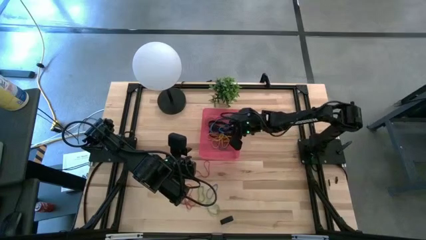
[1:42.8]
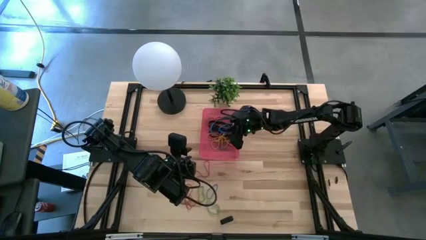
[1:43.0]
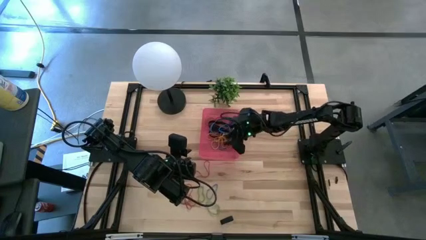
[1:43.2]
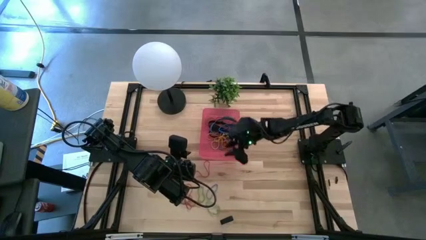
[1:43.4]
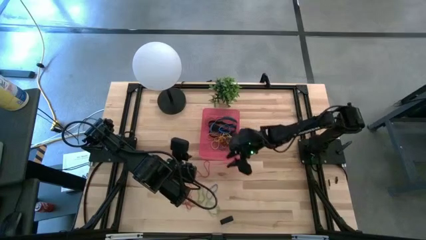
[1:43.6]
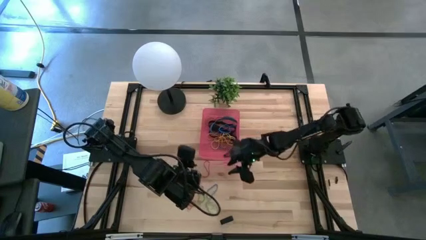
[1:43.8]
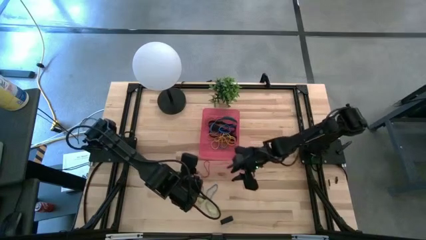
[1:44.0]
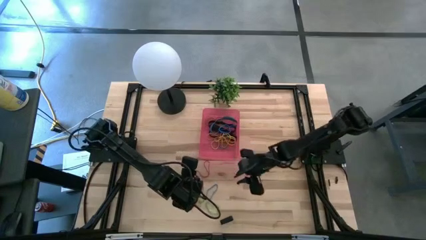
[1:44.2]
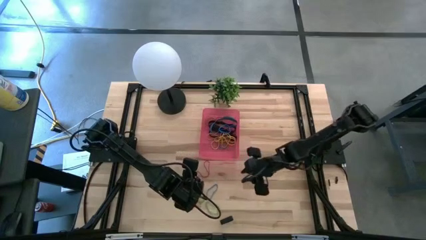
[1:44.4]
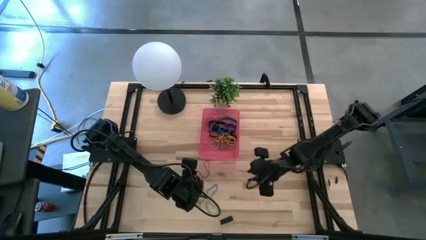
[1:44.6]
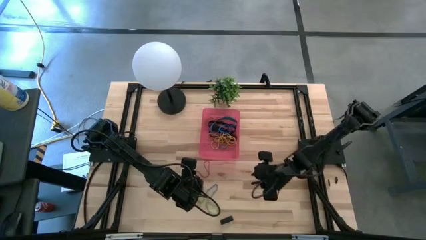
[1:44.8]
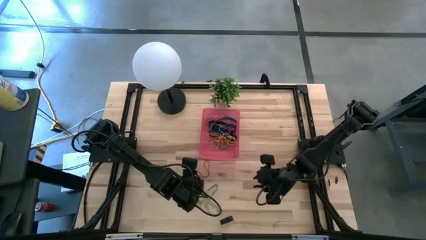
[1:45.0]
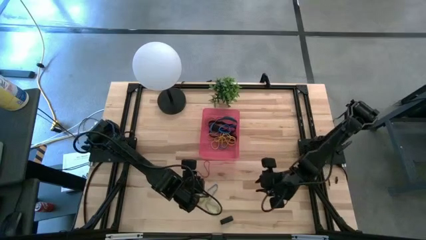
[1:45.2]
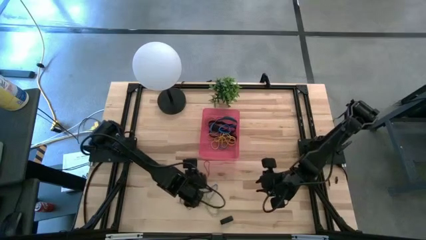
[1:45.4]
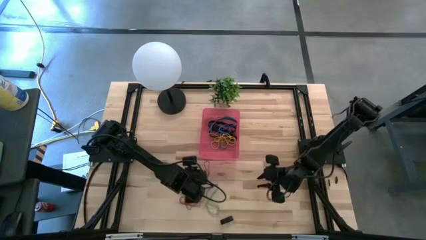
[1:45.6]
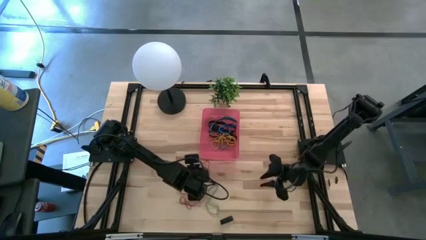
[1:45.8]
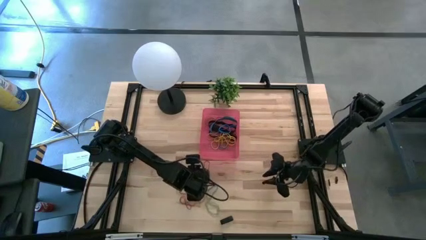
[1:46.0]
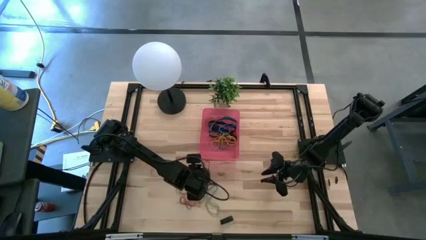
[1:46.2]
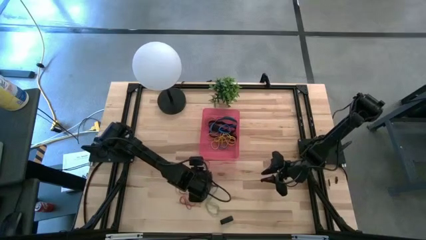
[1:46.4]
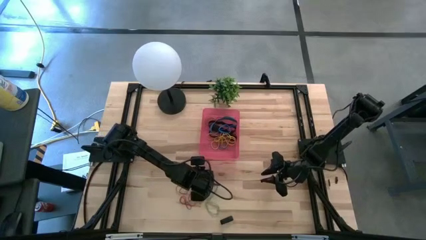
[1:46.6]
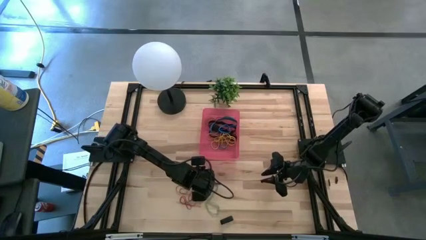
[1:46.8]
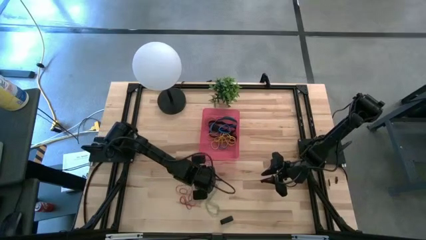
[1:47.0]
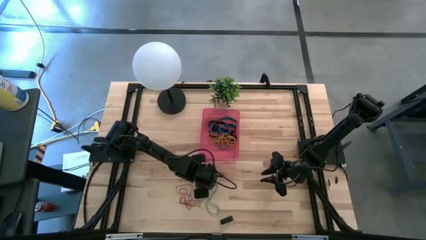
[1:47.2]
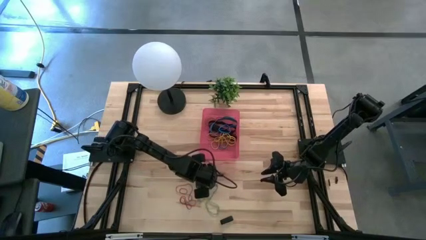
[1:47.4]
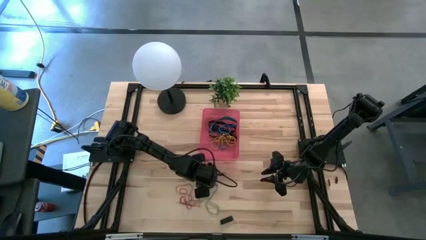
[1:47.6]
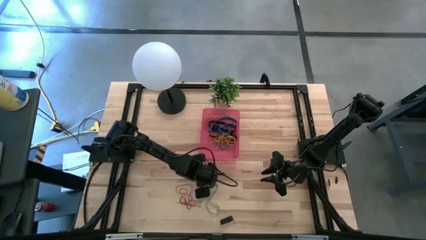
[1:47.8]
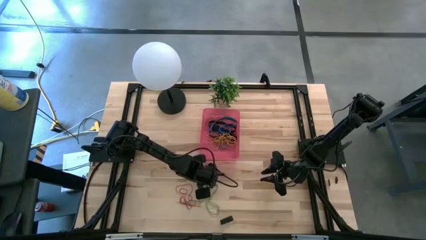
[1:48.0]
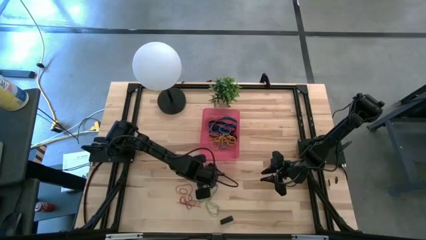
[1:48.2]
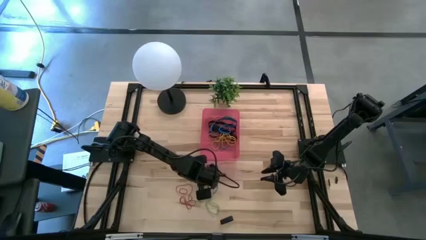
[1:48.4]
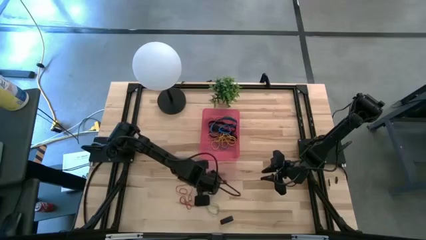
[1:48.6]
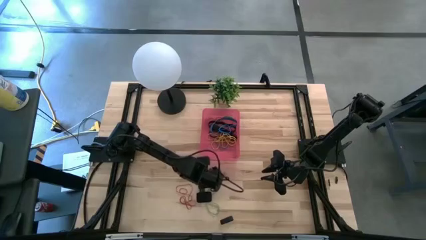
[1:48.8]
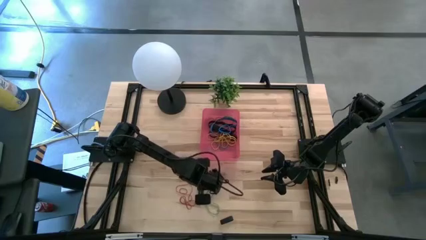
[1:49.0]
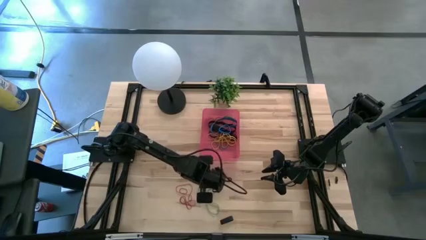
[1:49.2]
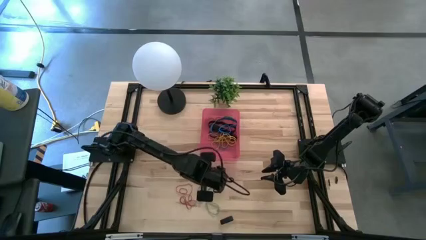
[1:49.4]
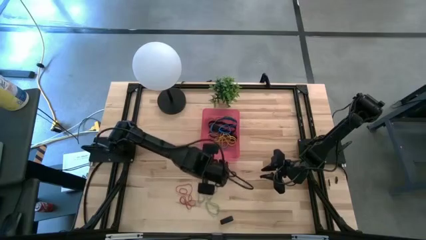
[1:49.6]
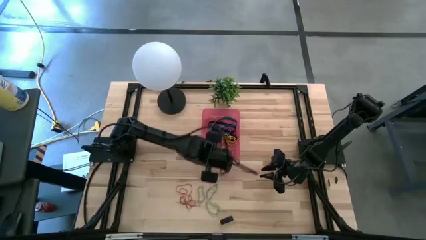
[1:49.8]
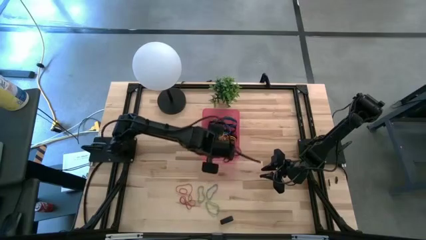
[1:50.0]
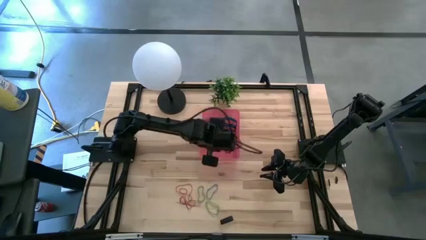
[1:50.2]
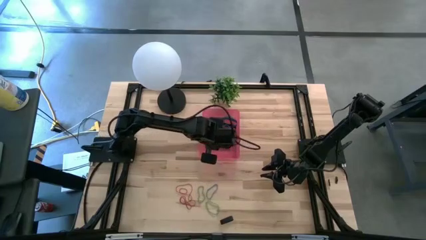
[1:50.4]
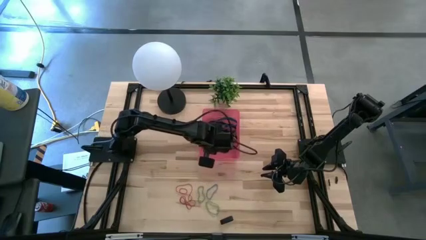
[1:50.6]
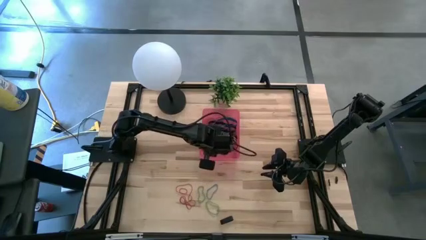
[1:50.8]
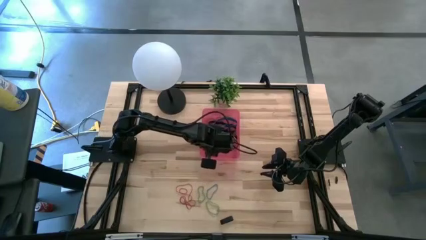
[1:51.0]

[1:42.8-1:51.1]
Task: Pick and place rubber bands into bin
Put the red rubber band into the red bin

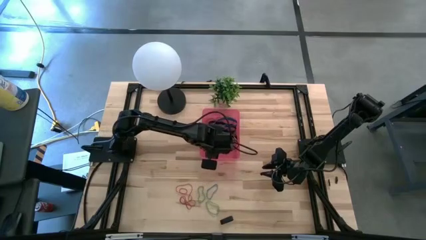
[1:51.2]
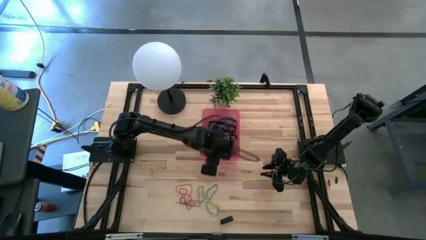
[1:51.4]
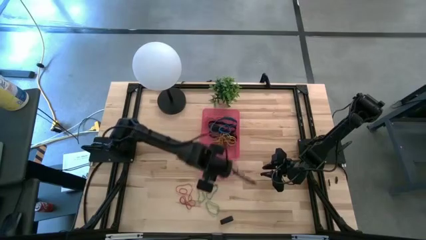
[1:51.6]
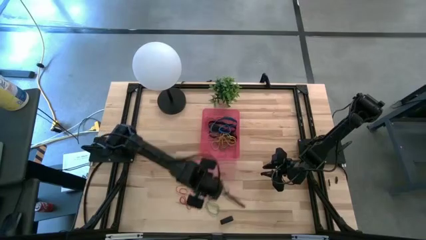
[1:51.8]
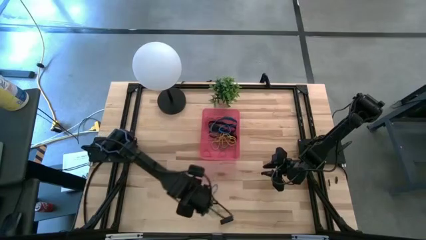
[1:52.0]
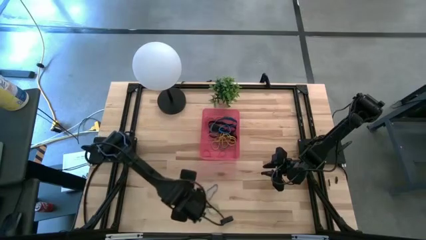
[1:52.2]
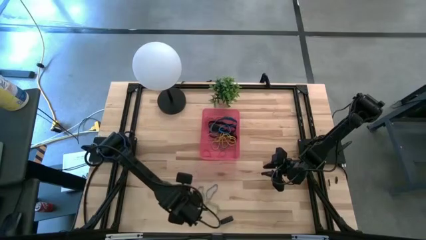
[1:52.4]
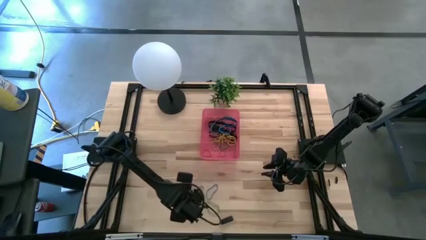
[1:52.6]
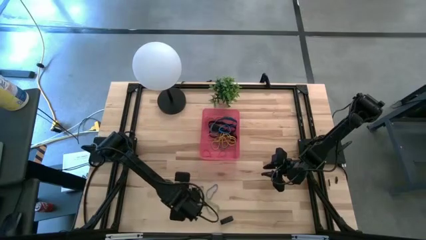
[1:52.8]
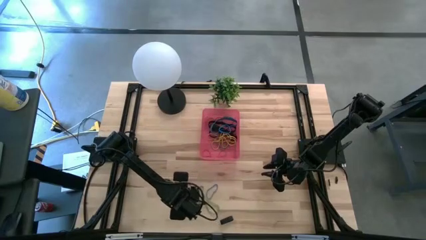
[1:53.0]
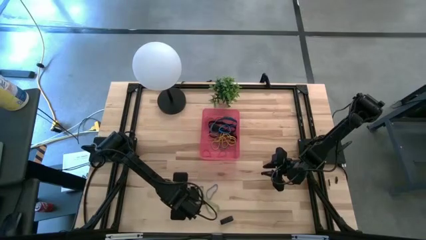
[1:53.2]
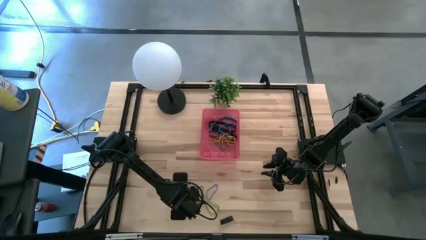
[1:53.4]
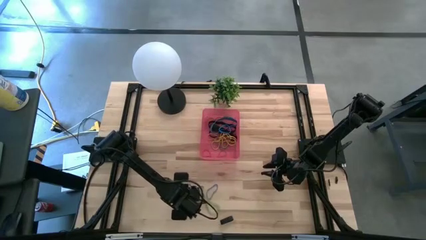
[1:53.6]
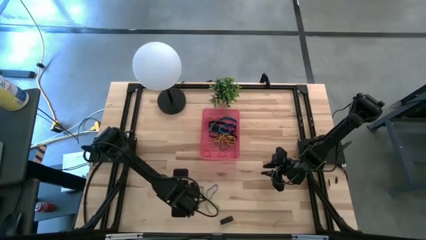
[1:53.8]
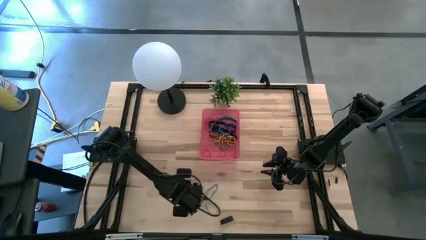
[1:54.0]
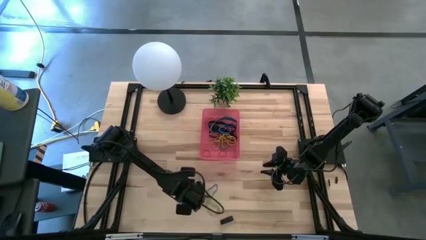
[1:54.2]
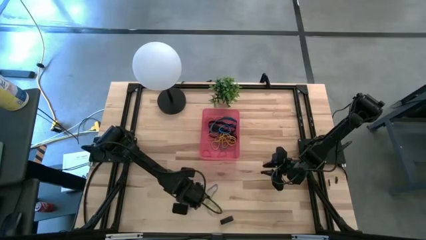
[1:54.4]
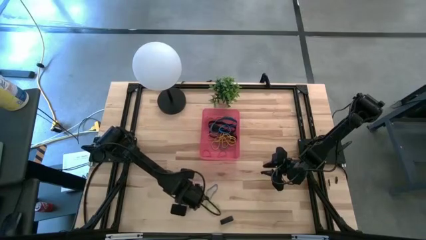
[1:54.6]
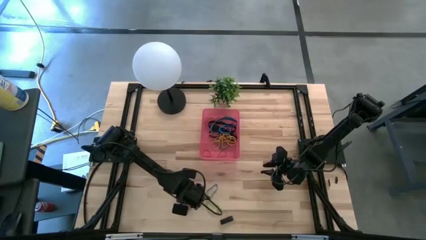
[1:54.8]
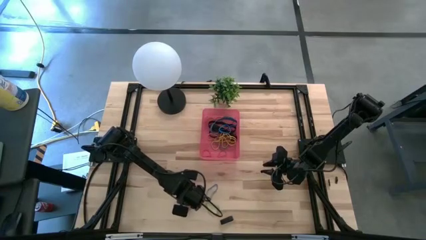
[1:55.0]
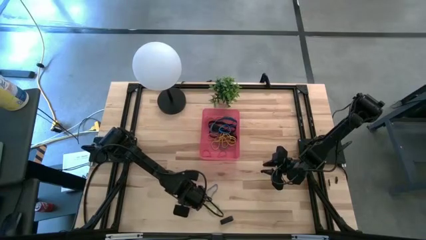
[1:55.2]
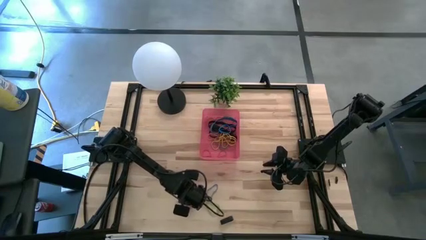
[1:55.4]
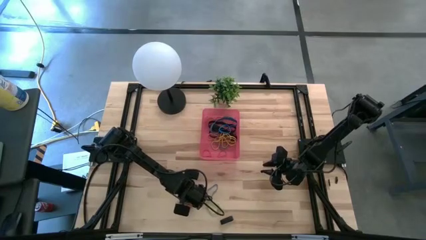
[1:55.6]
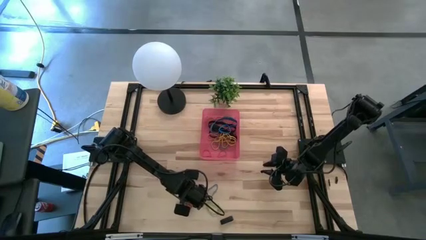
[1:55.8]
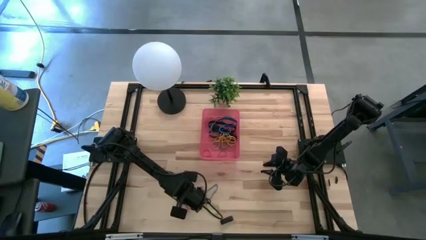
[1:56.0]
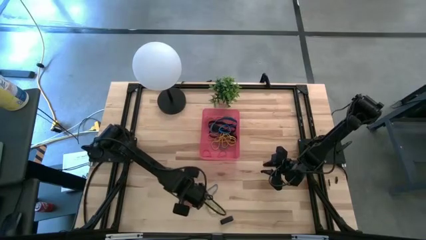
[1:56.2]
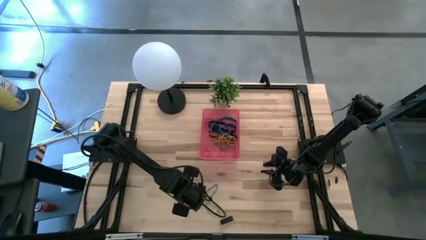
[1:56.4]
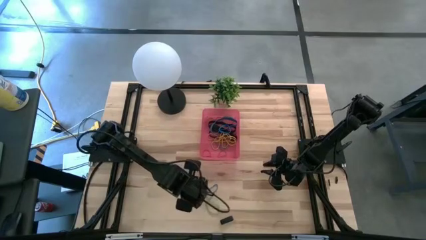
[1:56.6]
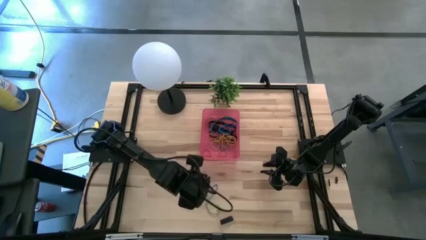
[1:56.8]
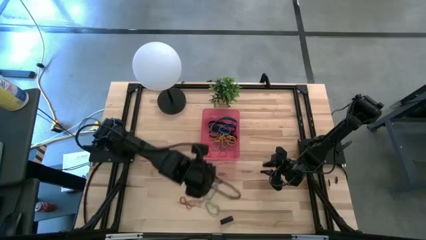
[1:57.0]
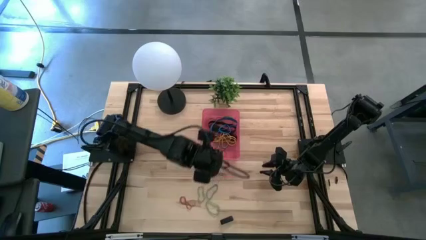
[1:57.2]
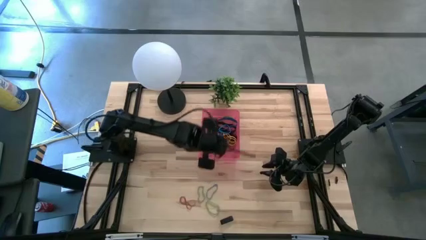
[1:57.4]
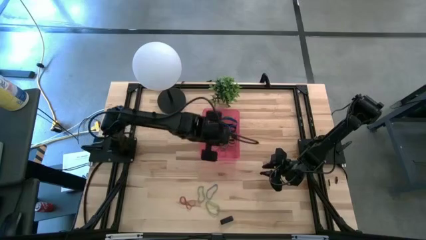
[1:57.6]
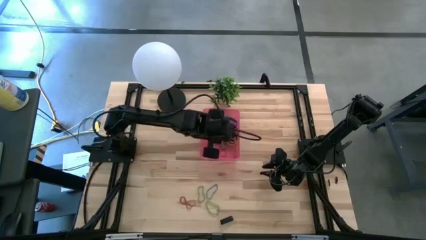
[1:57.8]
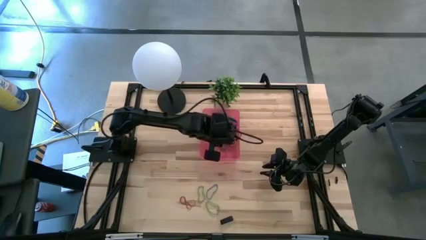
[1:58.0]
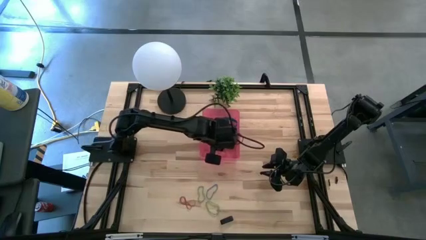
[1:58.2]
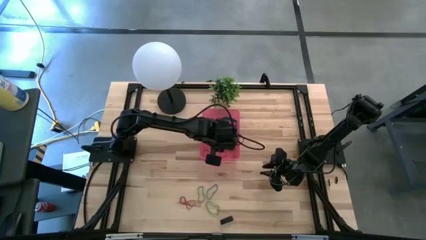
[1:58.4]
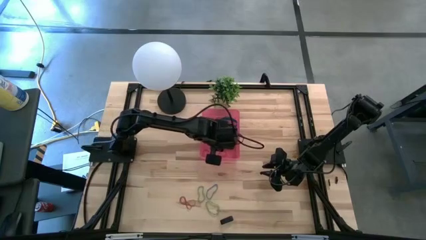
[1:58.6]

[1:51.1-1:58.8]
Put the red rubber band into the red bin
